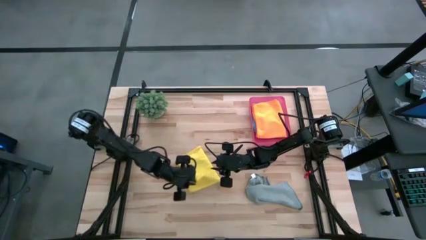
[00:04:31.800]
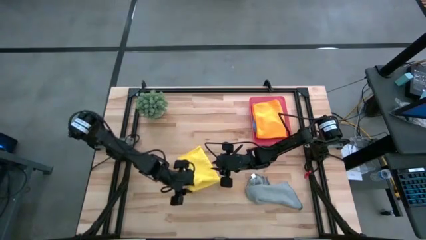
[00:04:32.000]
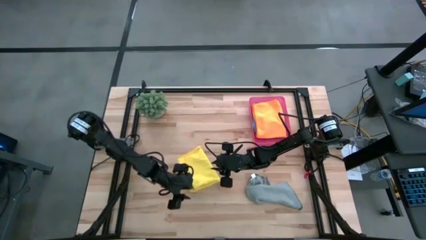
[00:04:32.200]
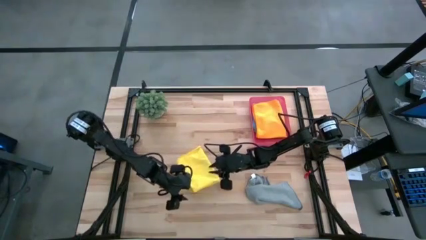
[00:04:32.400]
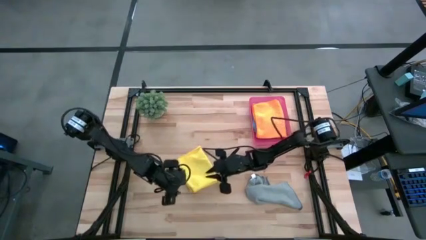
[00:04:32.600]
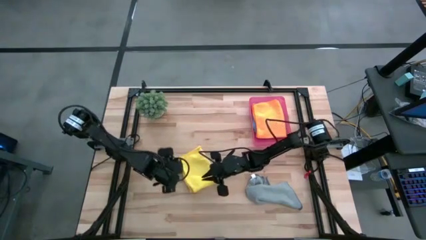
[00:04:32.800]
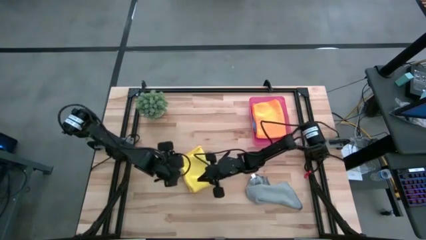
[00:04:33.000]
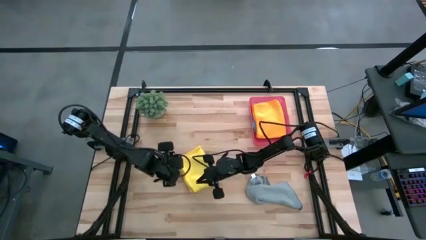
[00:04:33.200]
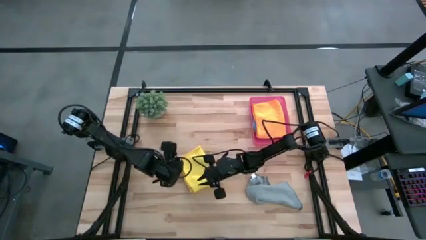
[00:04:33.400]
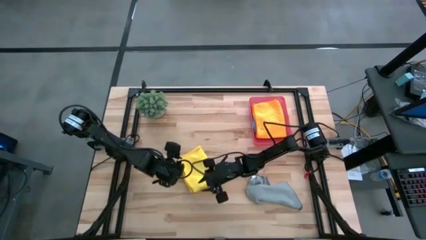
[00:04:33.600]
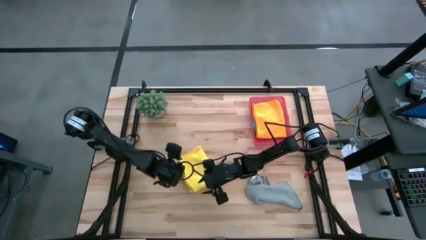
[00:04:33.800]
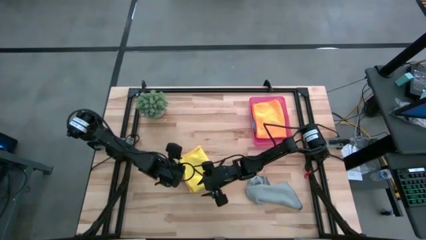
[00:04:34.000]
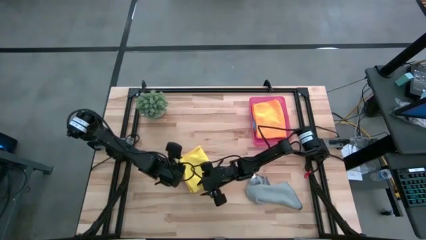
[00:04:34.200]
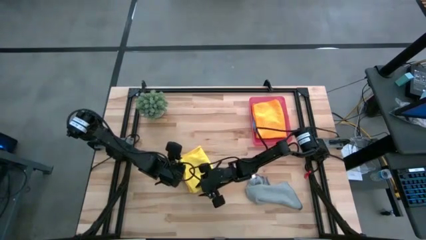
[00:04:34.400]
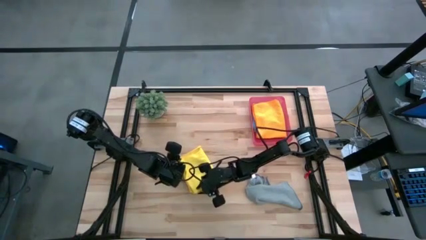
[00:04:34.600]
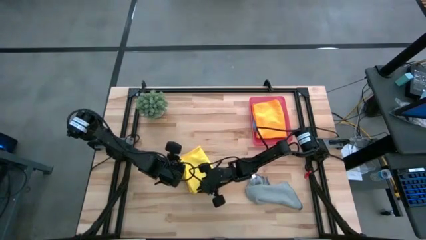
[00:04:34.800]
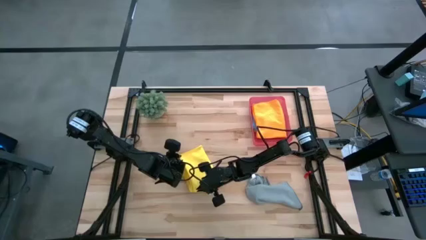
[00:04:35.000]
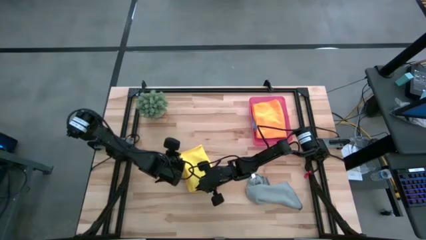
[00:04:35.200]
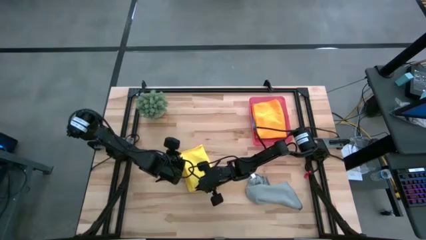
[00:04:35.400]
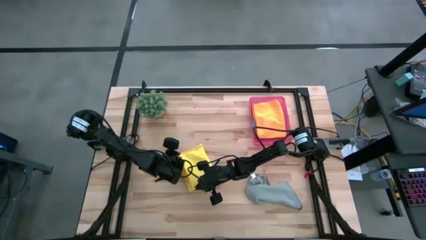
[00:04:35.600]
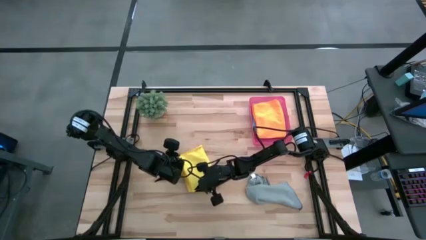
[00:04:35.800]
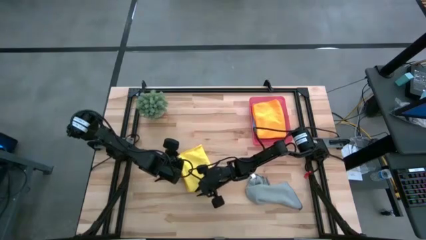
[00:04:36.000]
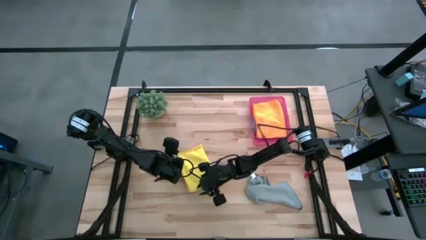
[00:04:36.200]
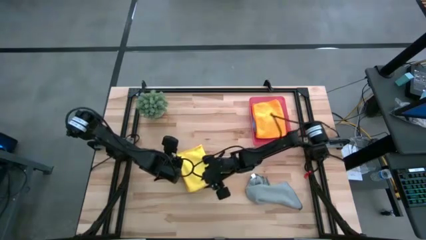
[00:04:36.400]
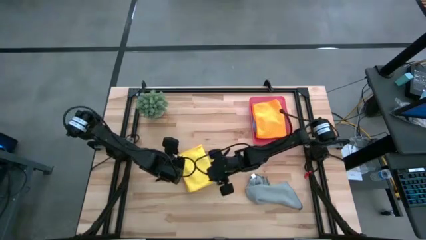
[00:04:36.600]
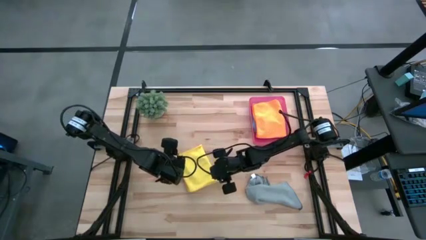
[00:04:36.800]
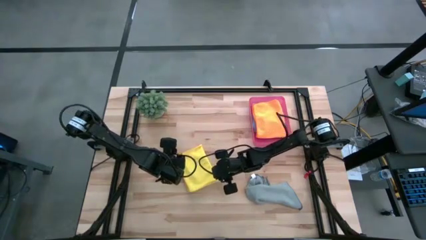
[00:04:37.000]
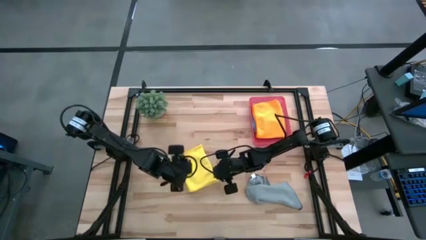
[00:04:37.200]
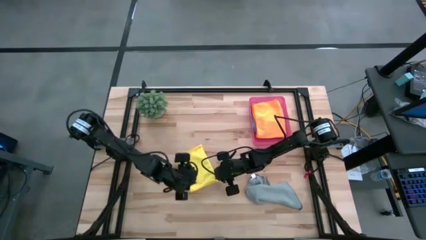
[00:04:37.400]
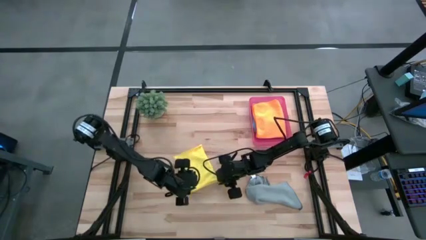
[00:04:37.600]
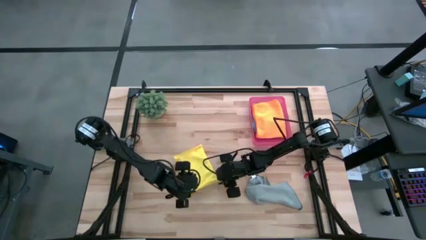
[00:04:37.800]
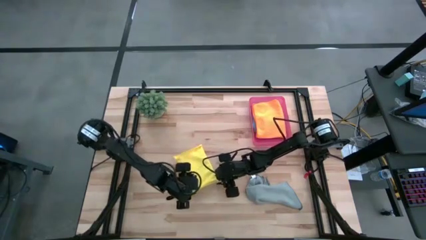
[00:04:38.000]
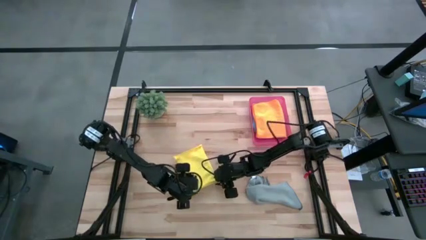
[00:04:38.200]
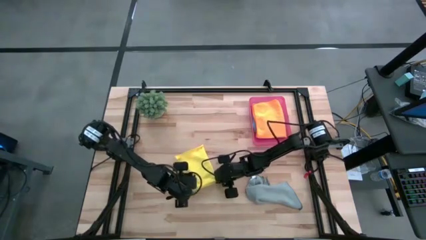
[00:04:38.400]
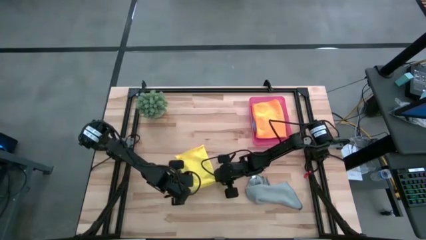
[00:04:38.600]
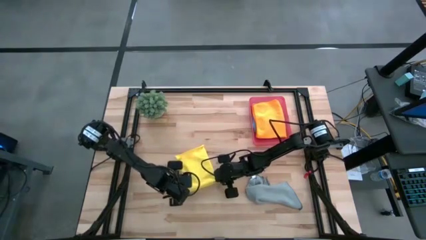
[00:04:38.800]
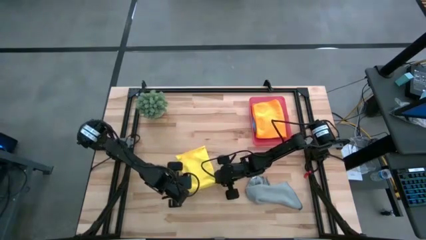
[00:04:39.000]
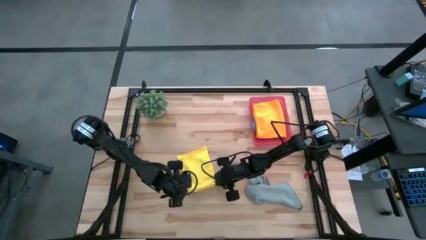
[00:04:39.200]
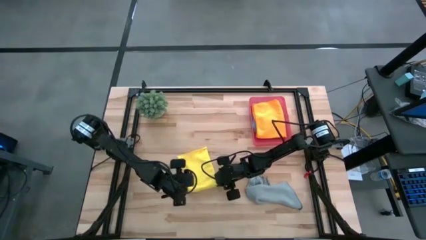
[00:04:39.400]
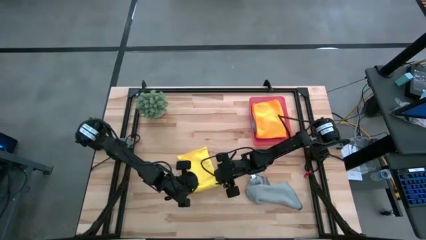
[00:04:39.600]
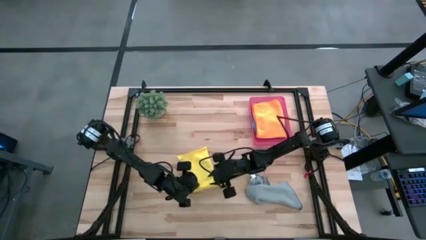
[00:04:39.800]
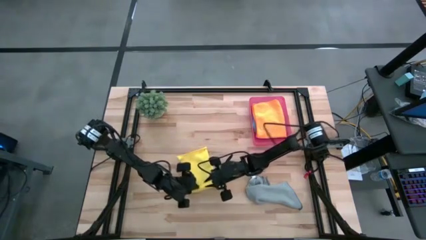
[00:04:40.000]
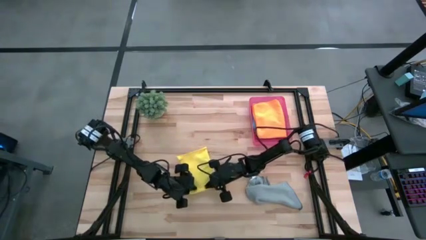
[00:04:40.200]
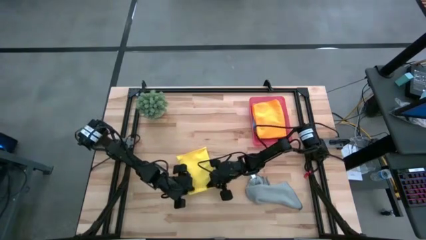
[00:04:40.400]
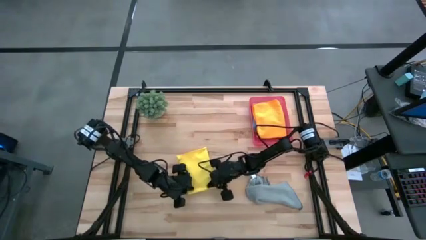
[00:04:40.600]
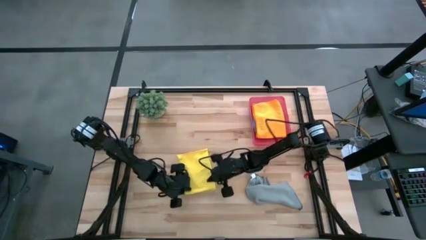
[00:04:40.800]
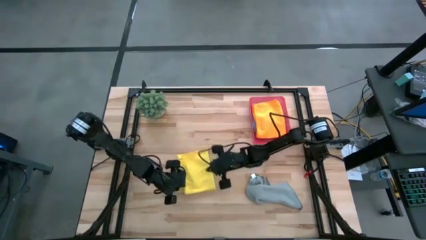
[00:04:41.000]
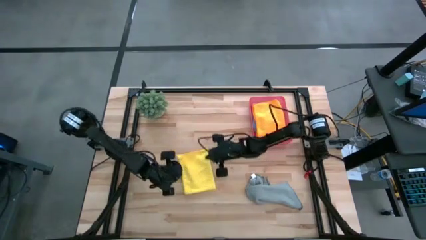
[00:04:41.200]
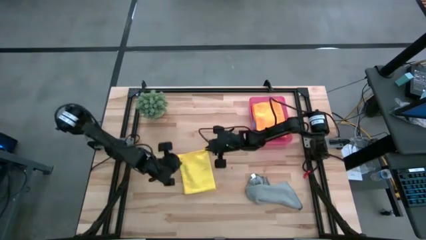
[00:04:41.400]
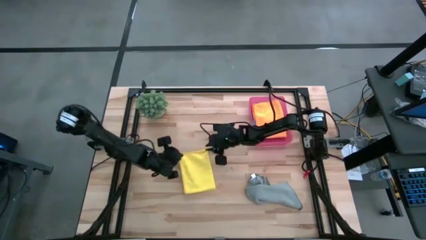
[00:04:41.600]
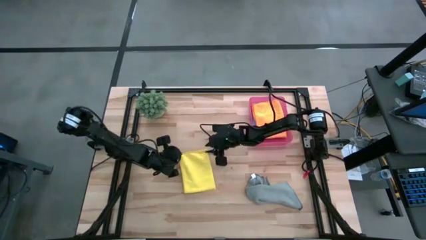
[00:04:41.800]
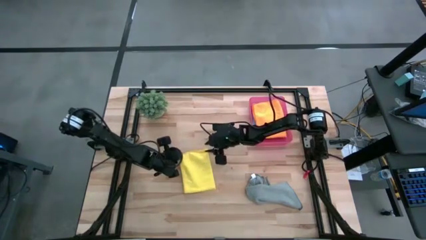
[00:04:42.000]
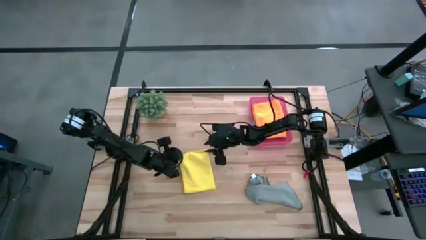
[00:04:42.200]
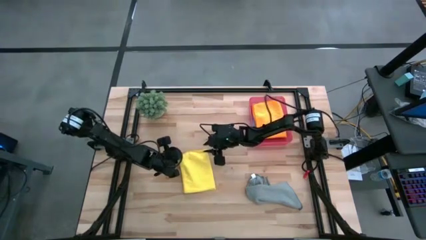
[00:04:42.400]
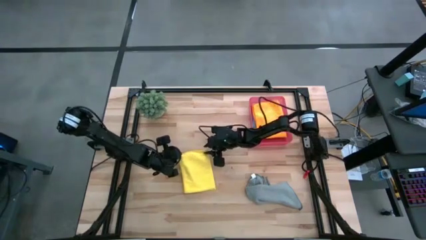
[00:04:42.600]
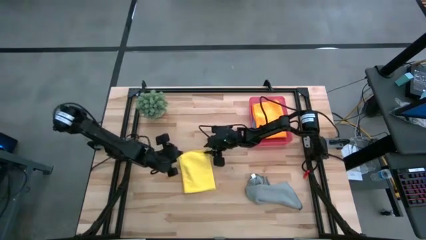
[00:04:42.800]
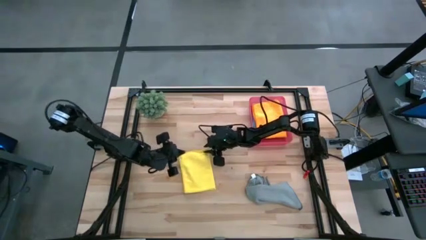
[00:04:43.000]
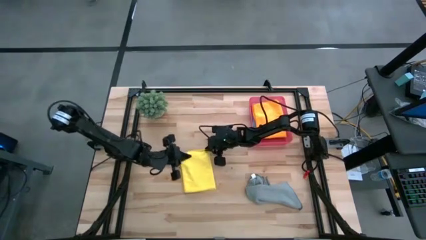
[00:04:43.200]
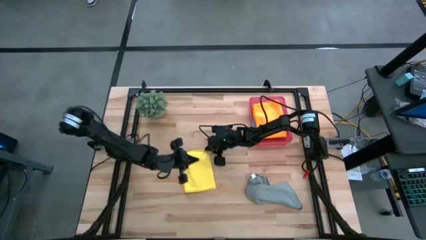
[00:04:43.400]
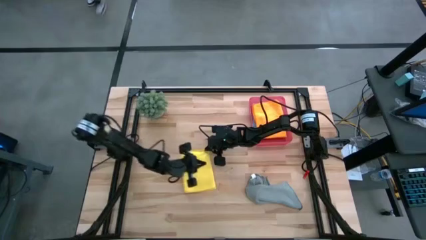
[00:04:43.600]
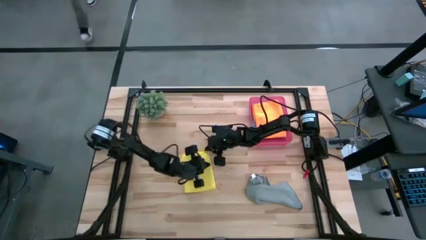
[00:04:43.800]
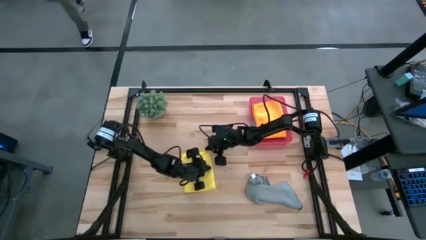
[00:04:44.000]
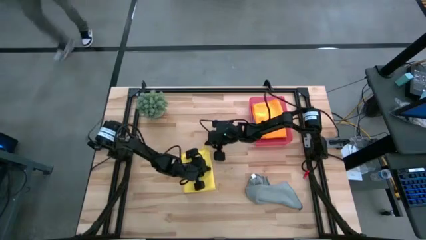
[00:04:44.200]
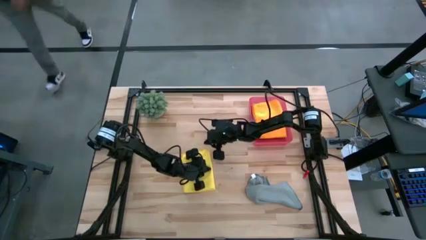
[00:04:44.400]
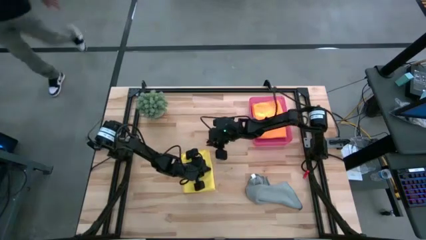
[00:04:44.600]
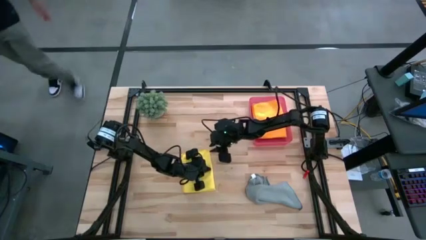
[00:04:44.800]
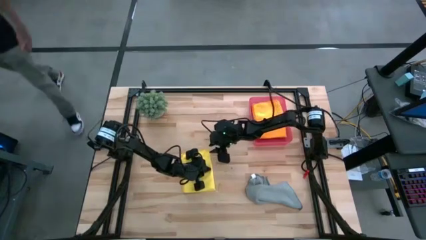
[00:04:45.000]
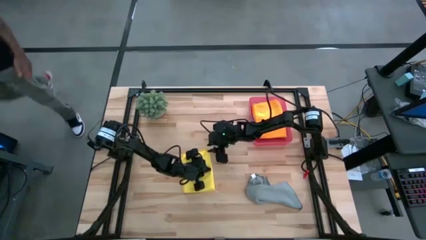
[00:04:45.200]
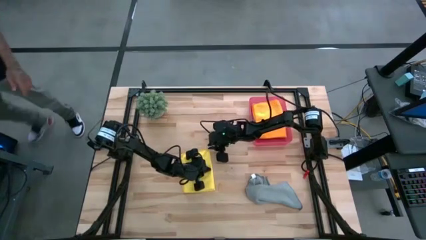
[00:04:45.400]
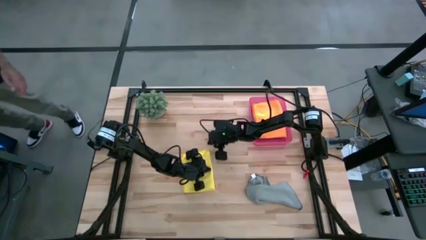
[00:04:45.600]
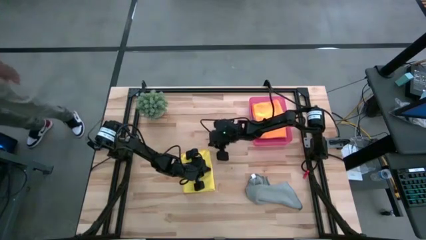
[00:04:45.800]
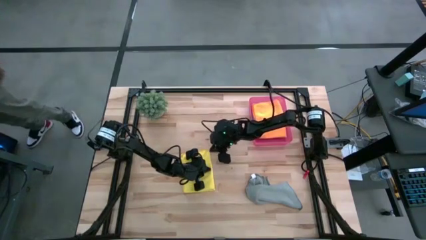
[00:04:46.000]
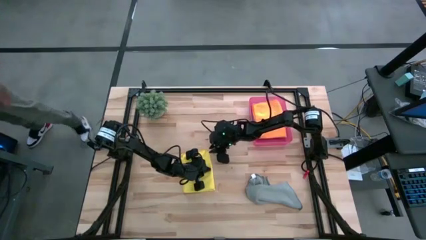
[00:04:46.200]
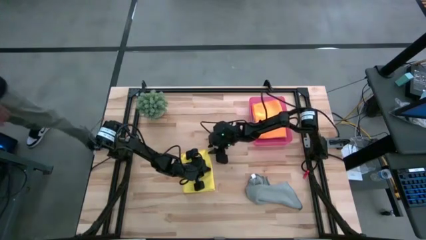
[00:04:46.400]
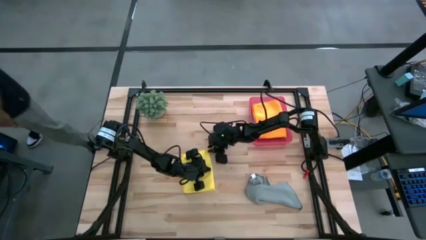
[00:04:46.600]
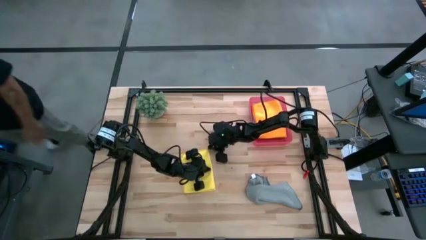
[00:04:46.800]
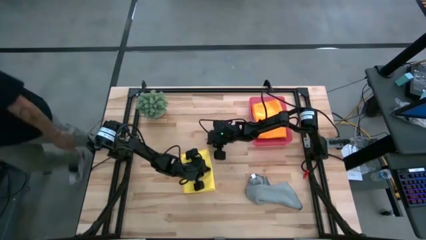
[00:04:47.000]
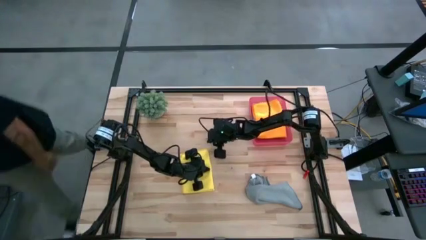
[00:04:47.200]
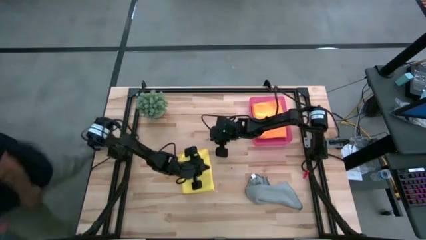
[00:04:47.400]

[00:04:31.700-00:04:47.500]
Task: Fold microfiber towels
Fold the yellow microfiber cloth
